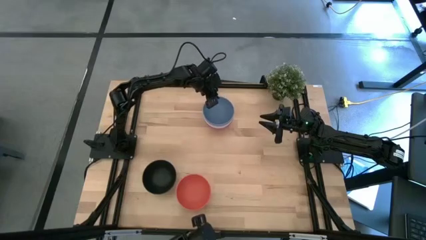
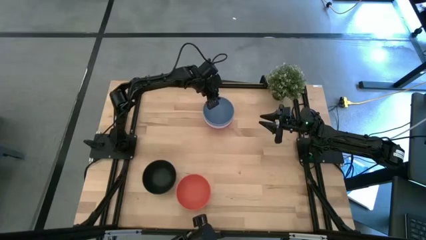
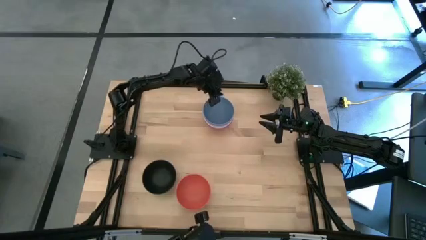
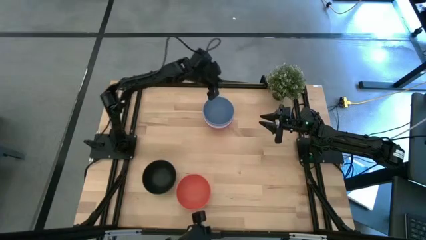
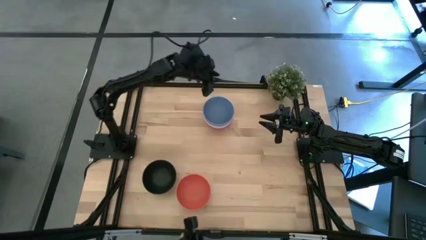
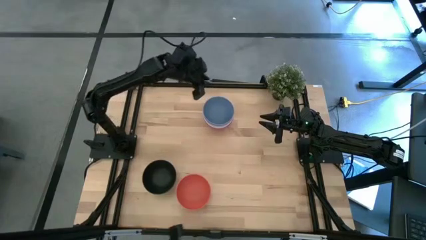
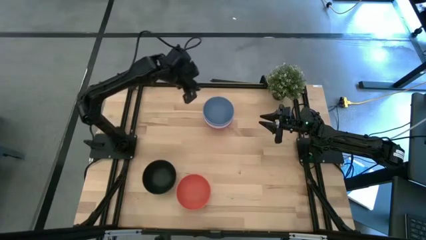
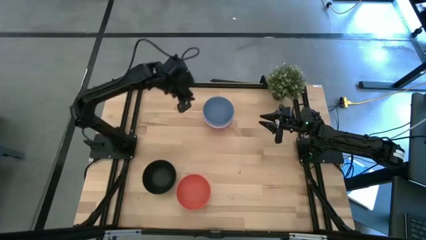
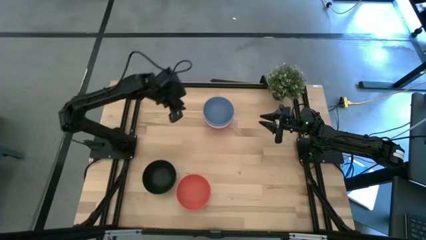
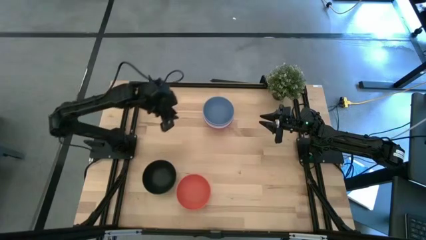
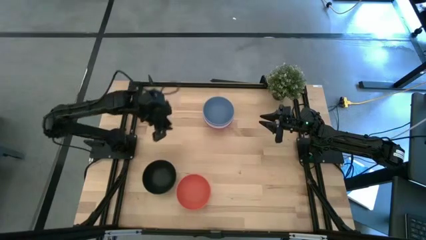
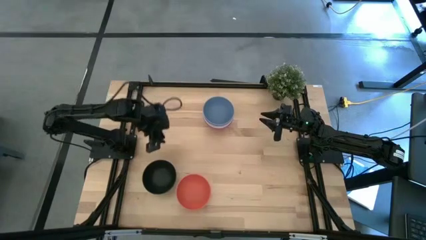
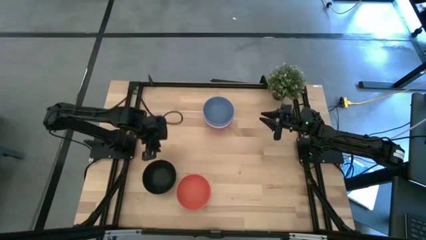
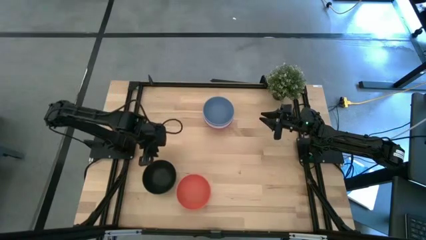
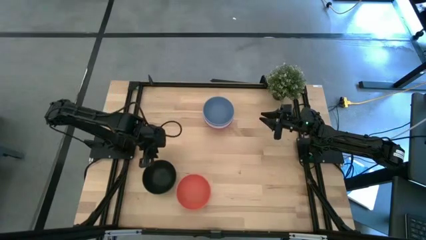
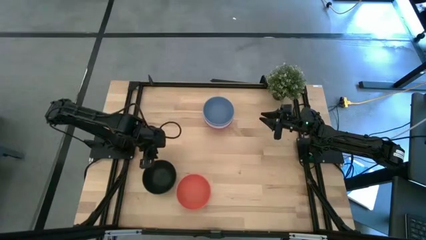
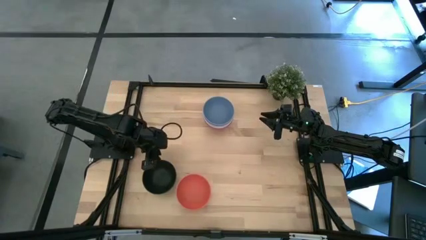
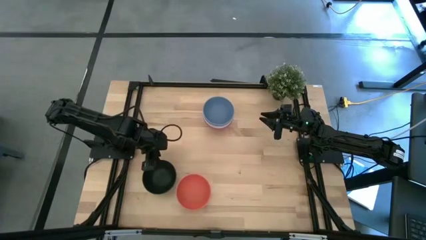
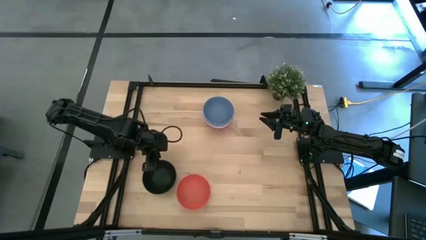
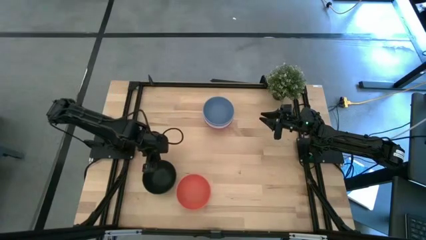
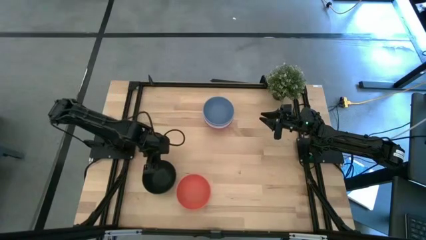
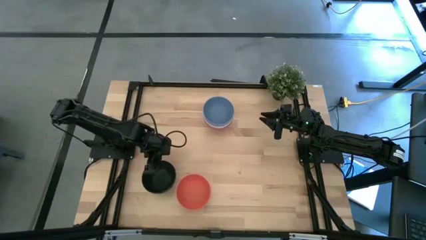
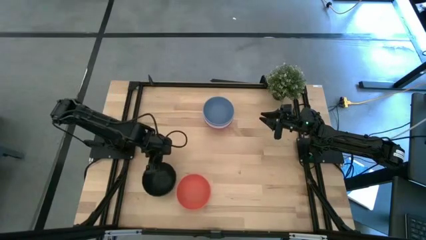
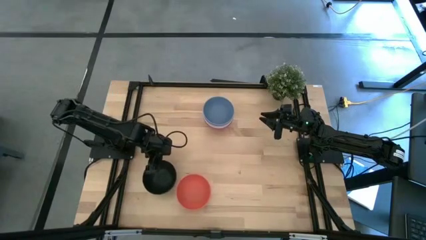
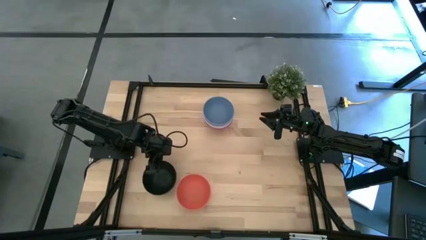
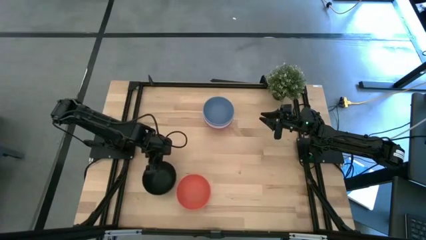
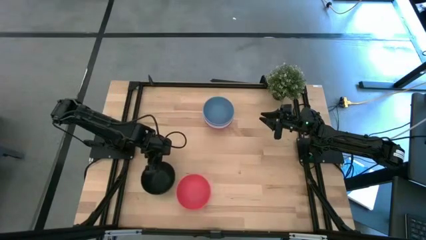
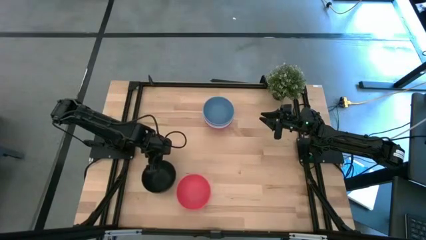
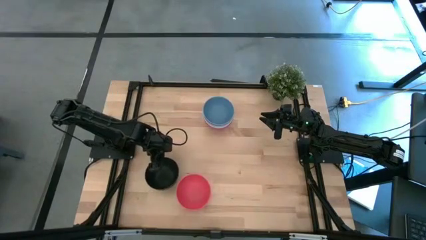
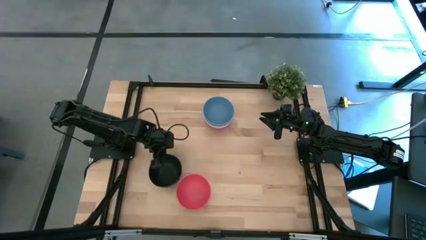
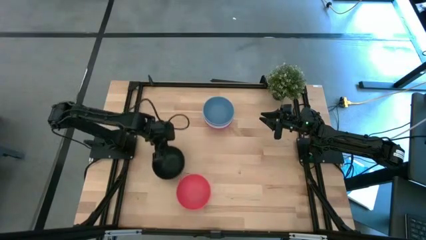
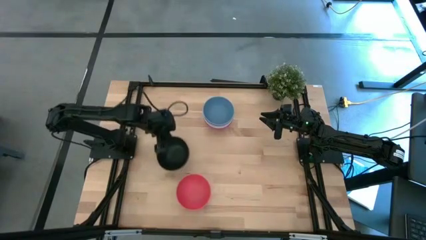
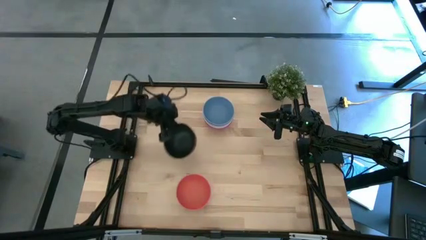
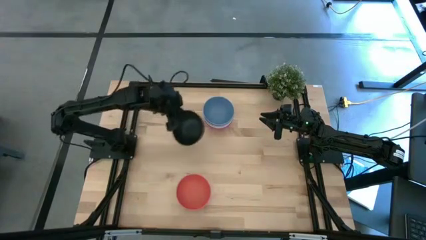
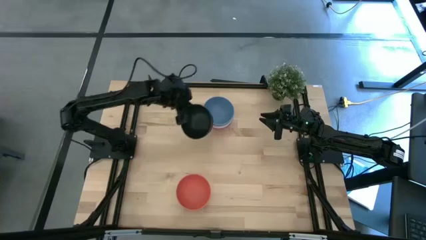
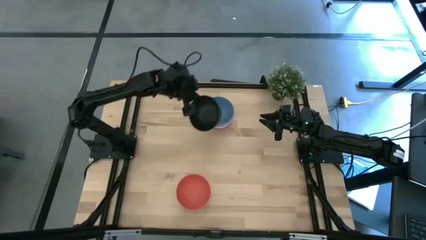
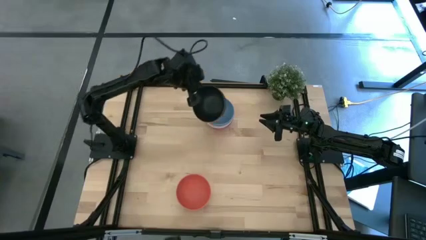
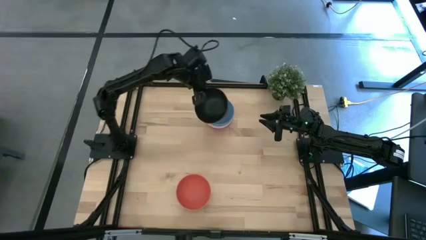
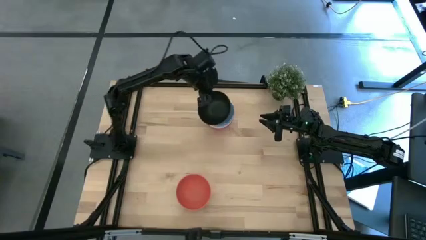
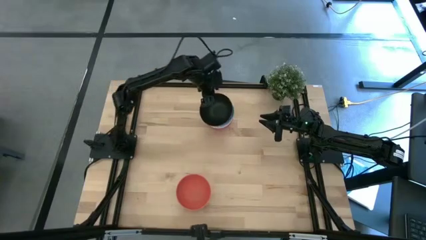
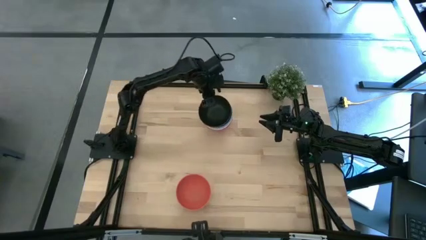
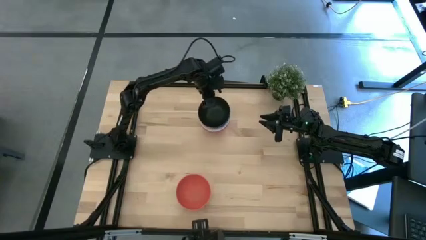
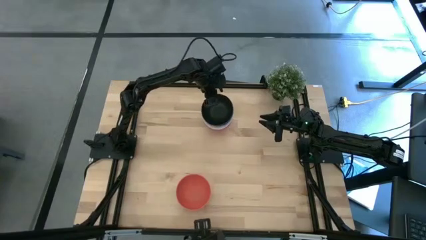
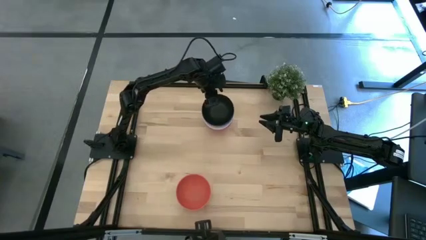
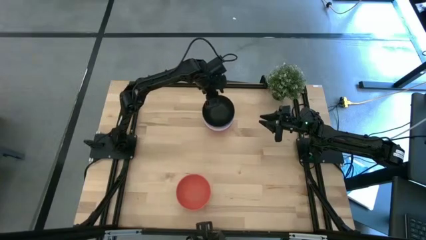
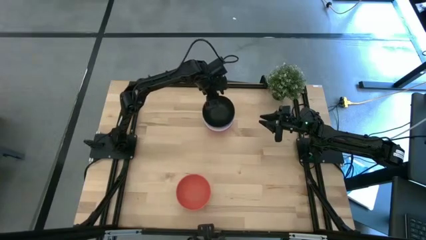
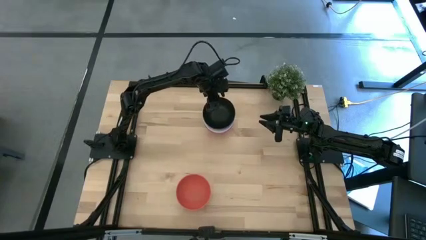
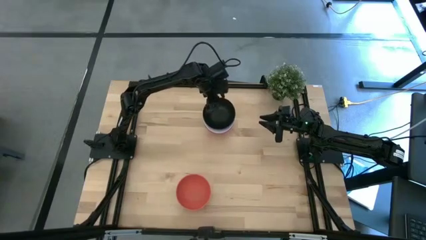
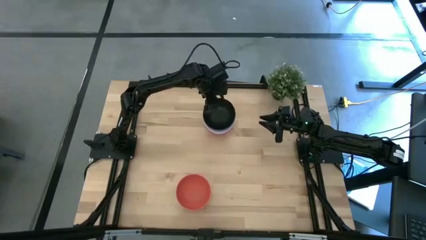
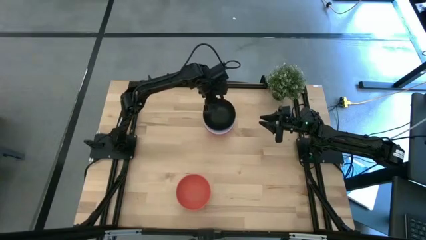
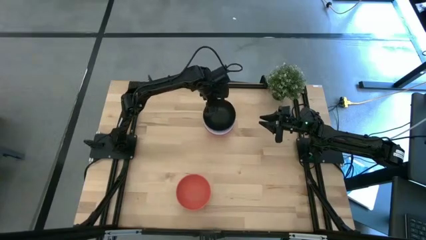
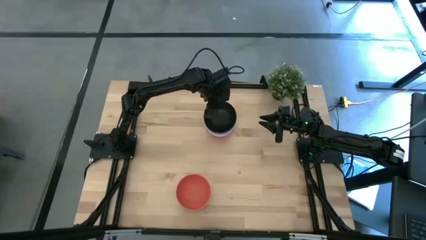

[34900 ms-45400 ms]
Task: Nest bowls inside each other
Stack the black bowl on top of the blue bowl

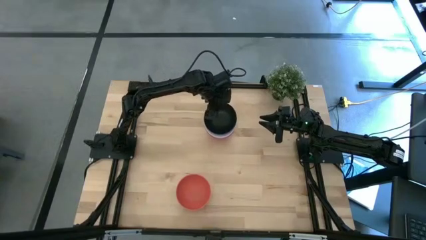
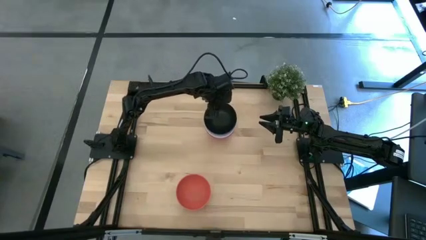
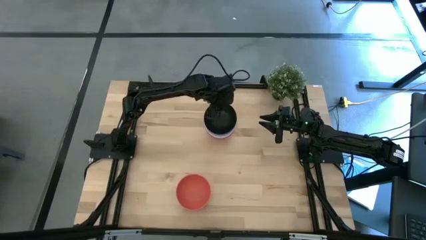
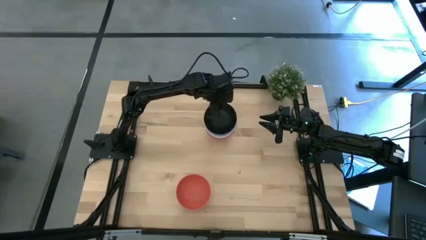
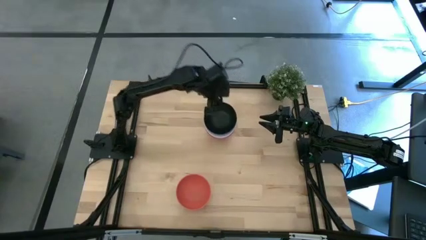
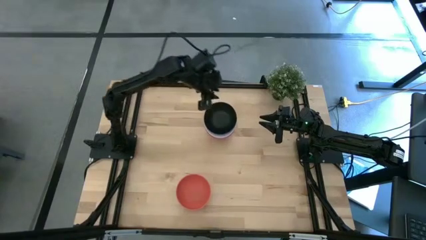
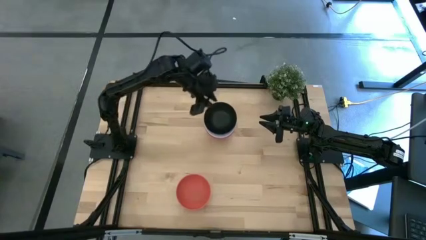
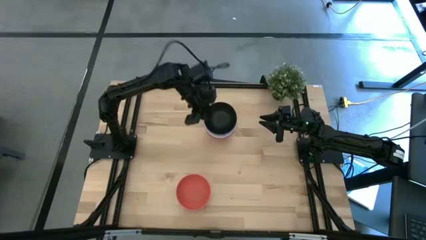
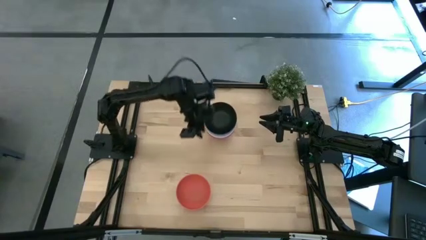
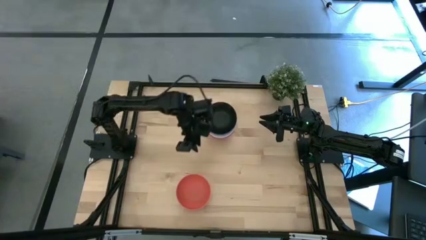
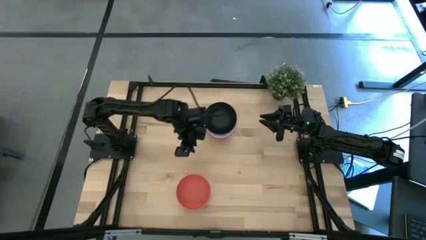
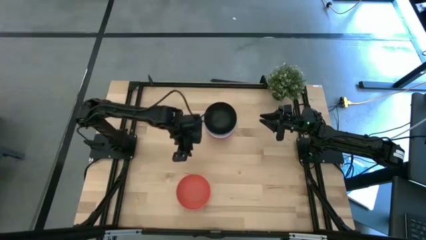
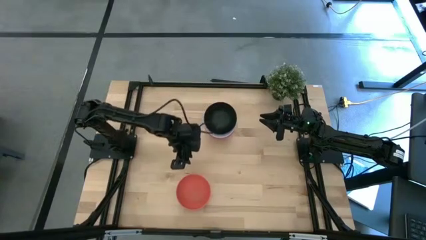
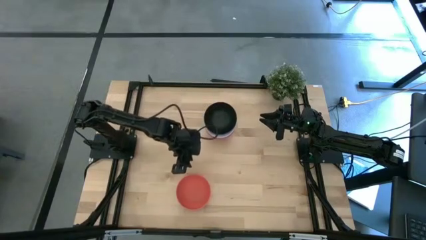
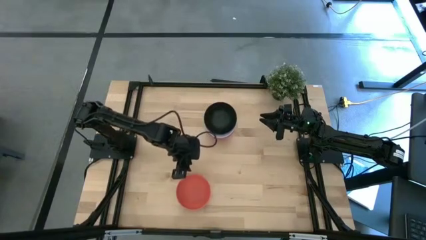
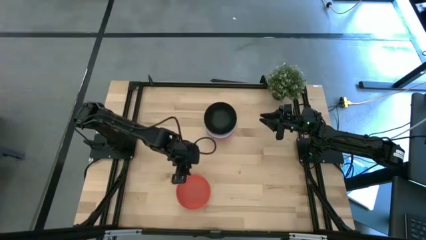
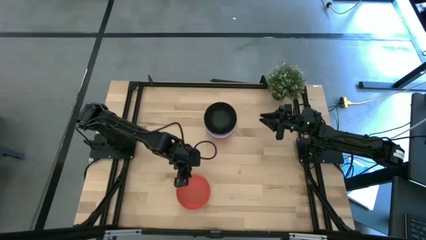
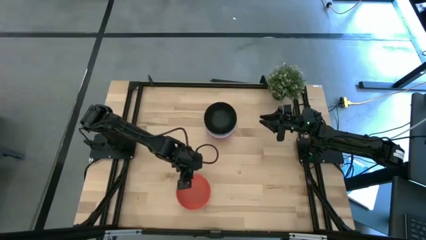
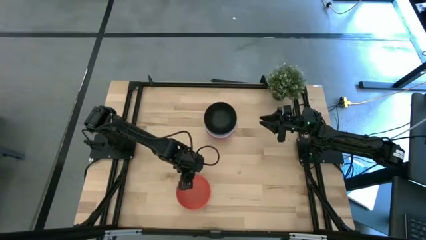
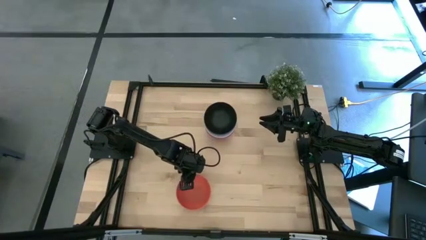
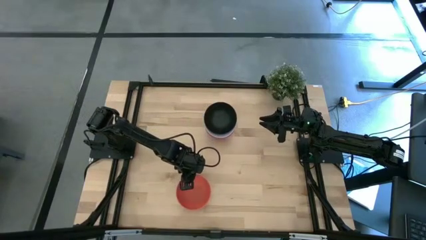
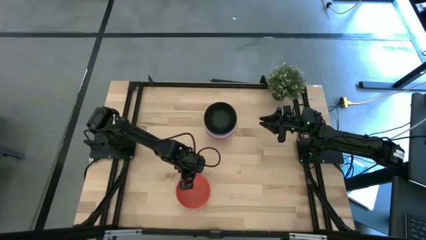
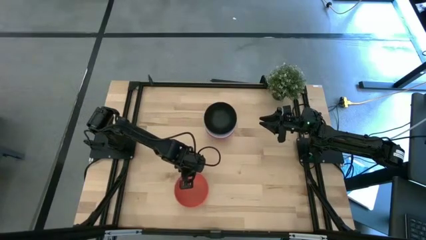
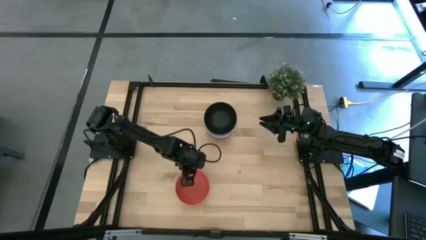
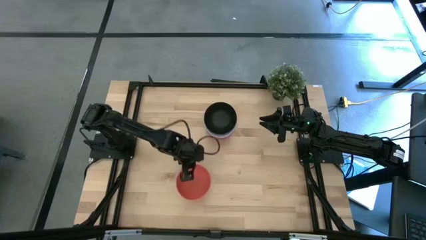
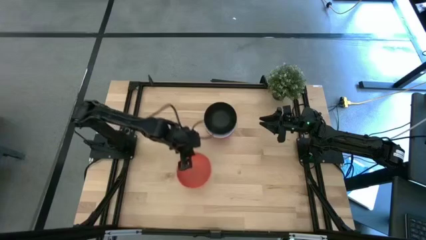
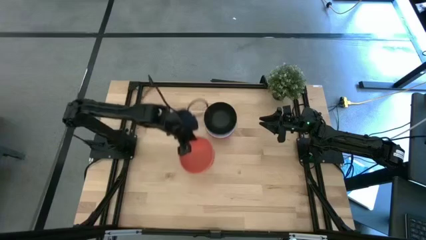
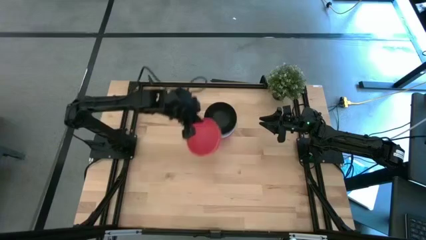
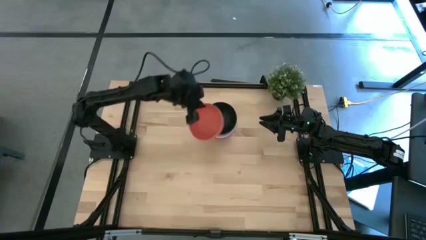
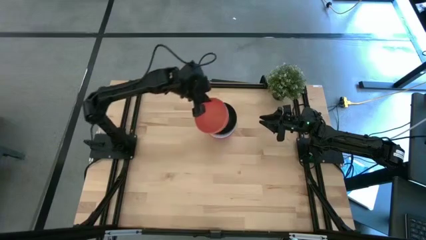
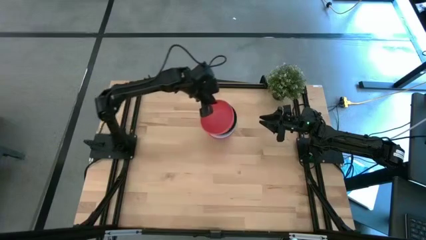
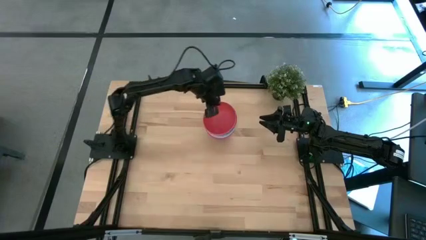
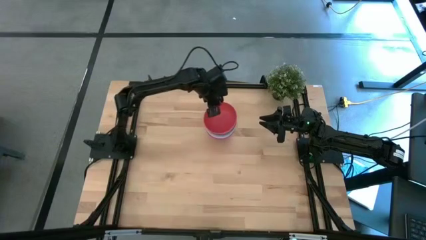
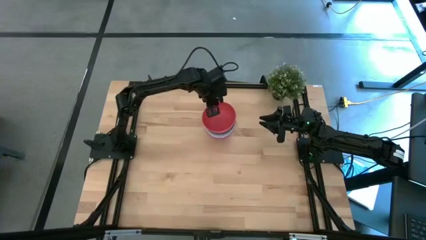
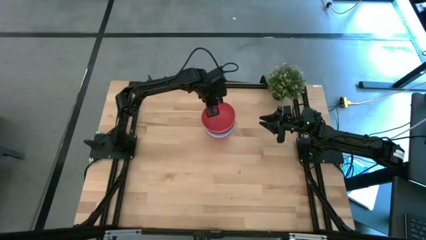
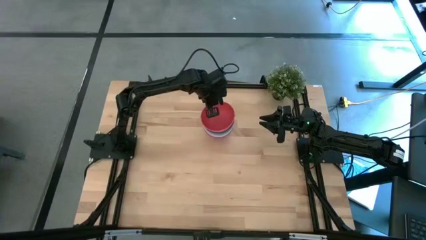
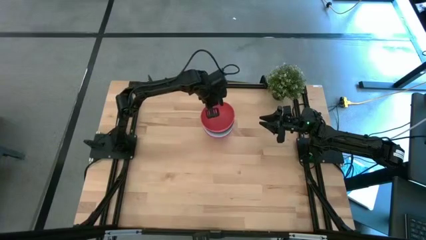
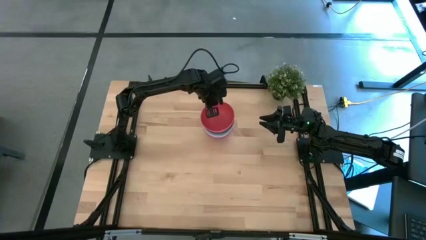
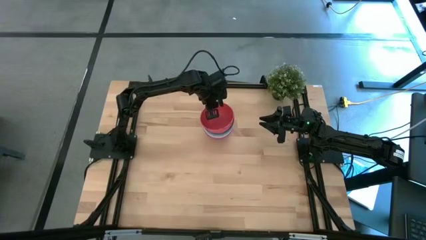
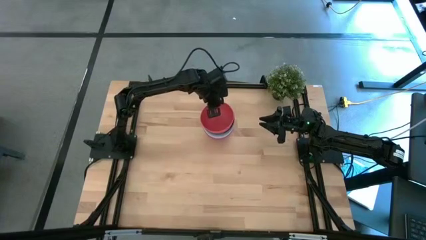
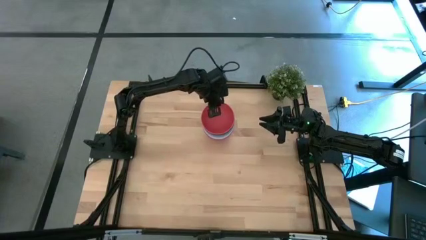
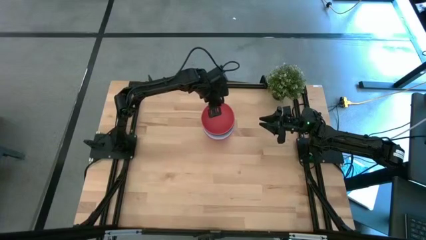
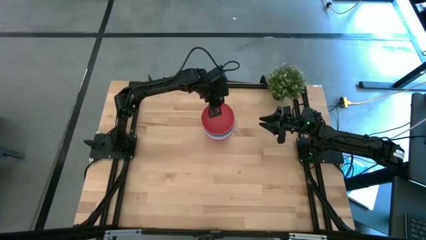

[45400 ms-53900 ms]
Stack the orange bowl on top of the black bowl
